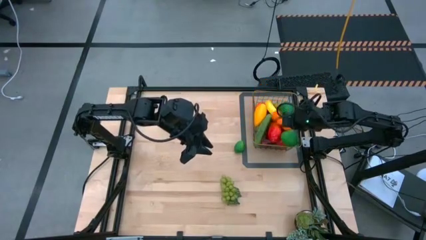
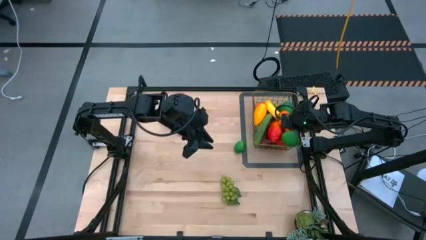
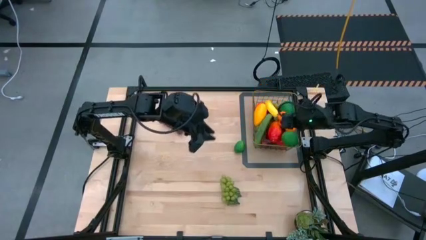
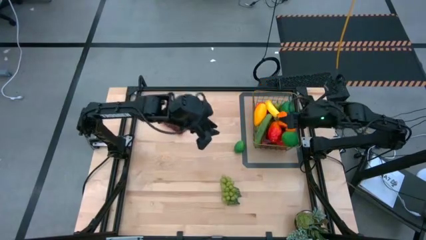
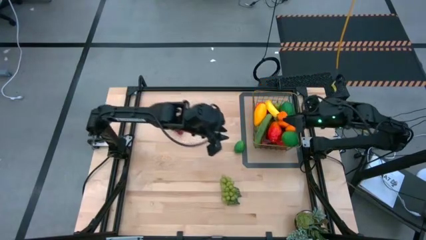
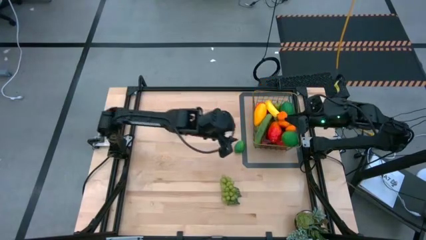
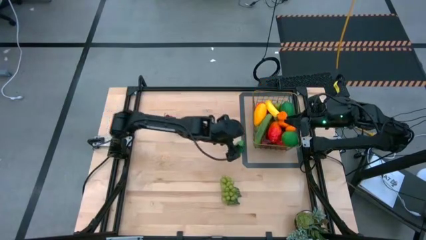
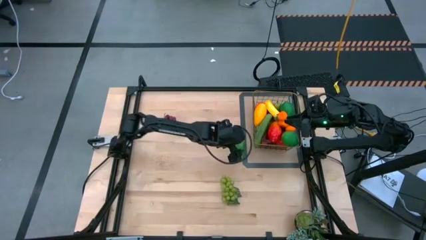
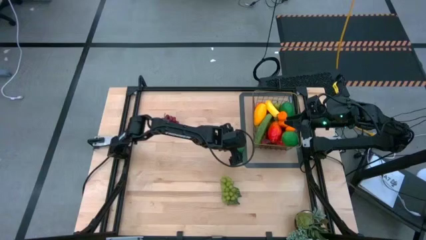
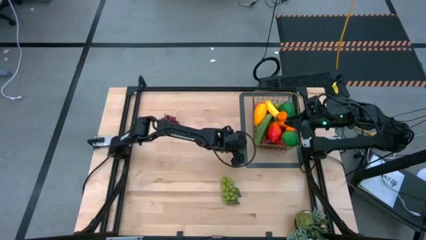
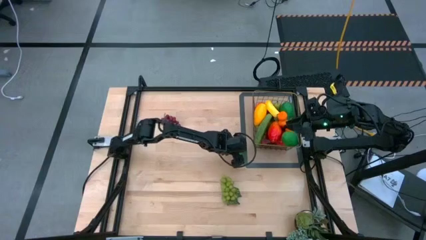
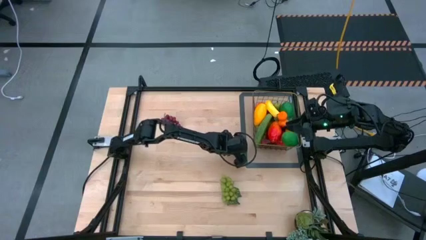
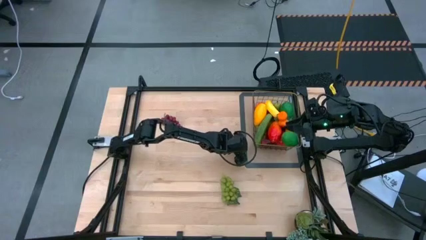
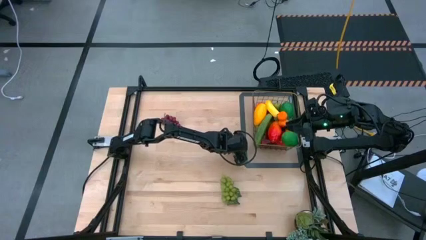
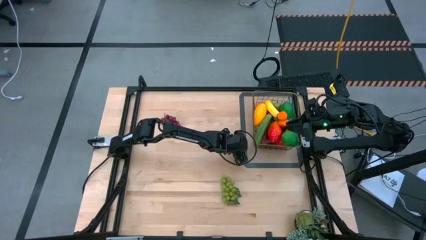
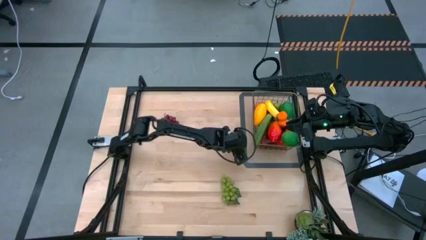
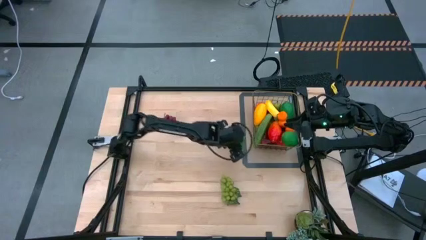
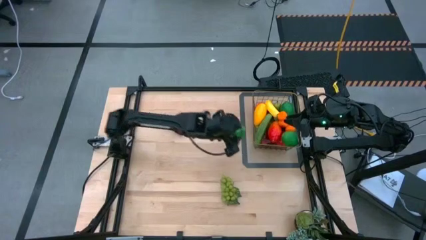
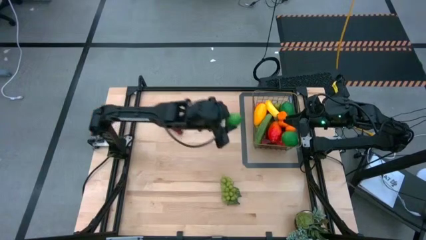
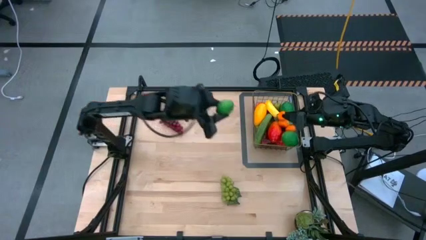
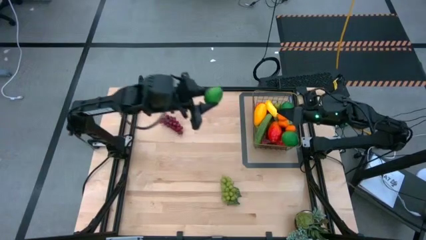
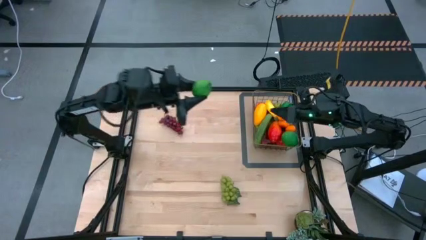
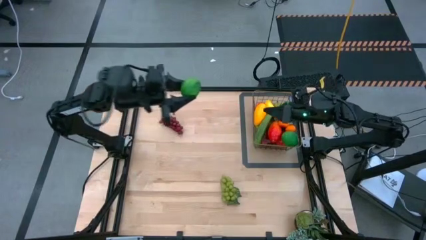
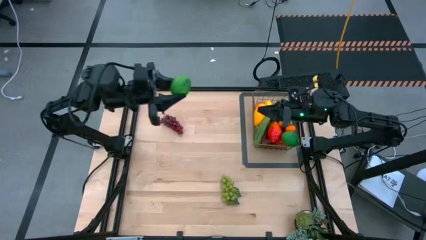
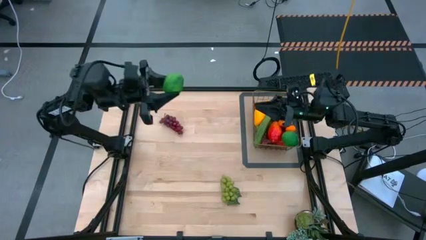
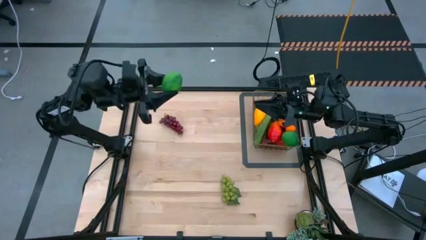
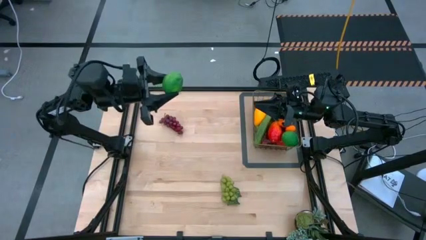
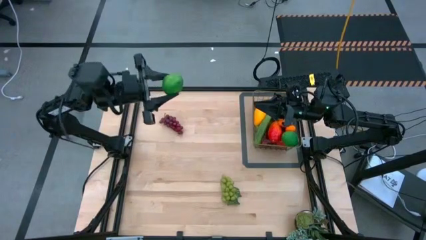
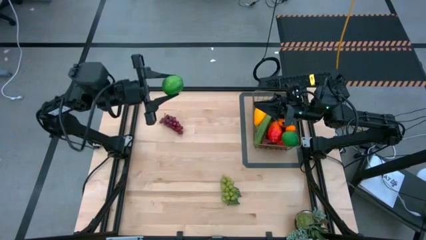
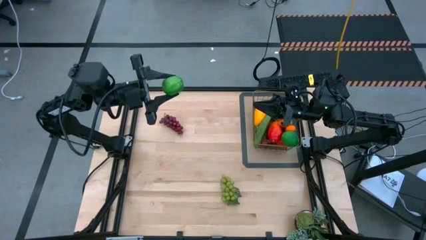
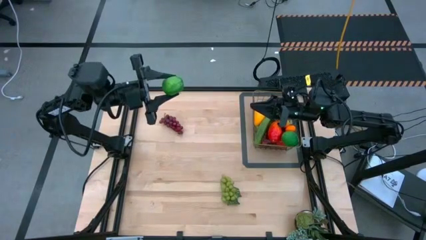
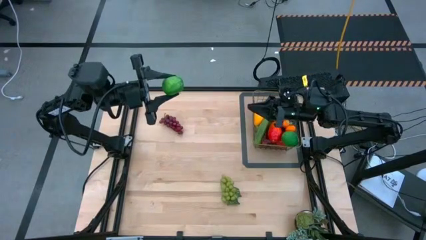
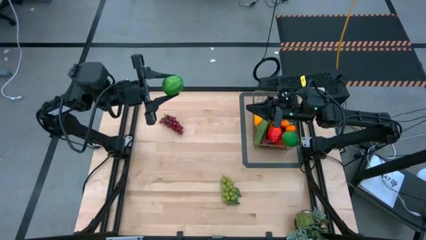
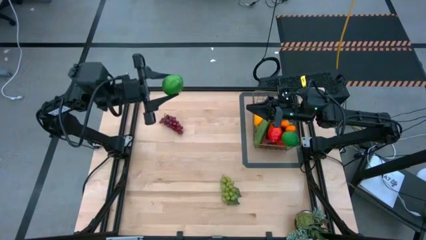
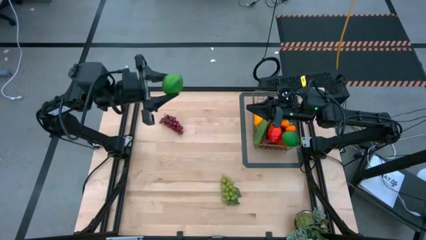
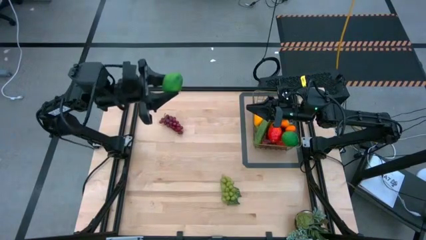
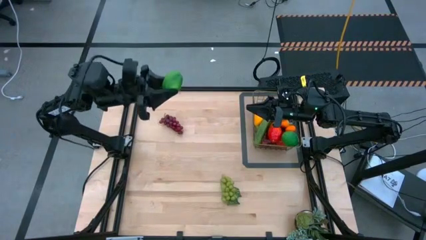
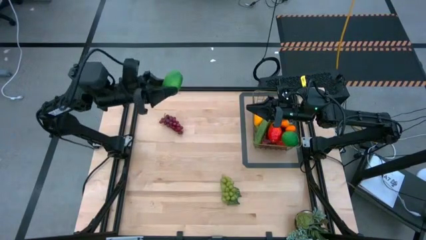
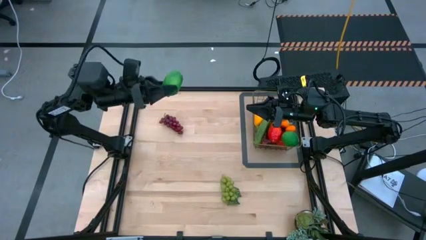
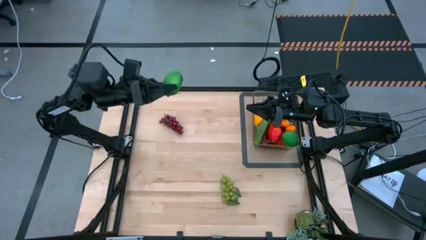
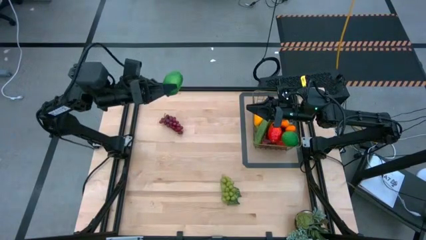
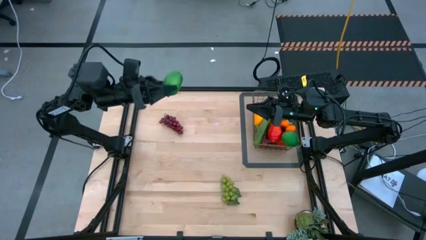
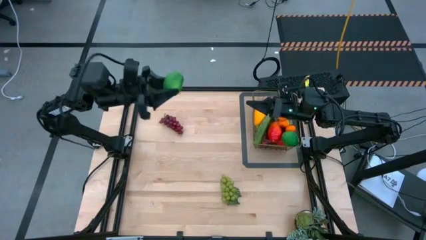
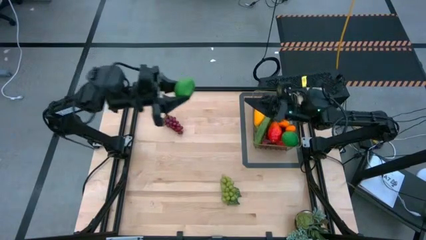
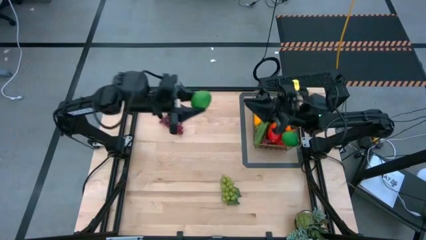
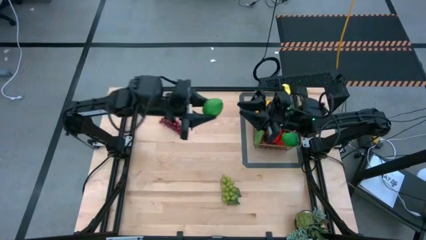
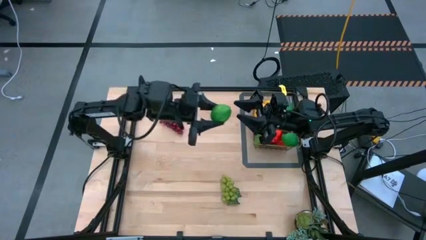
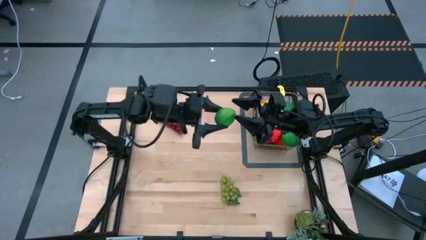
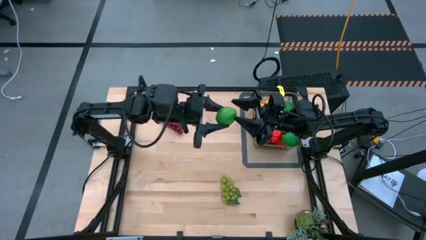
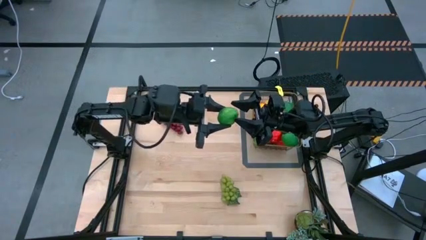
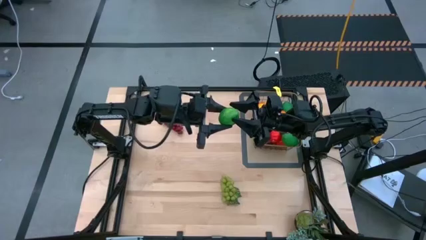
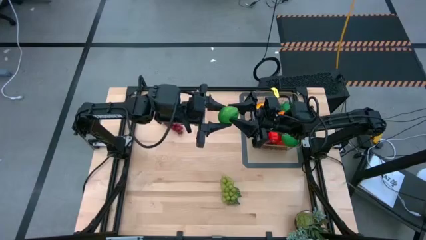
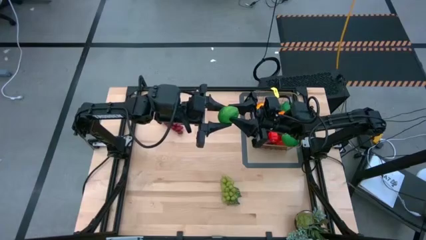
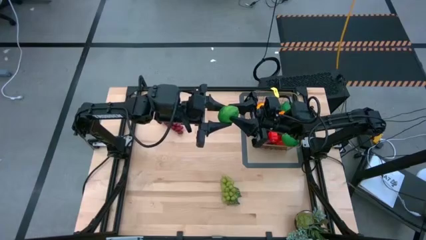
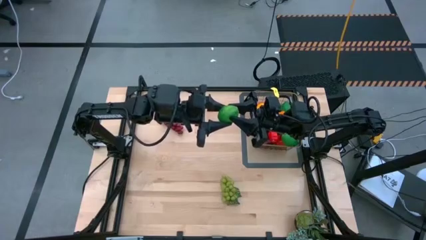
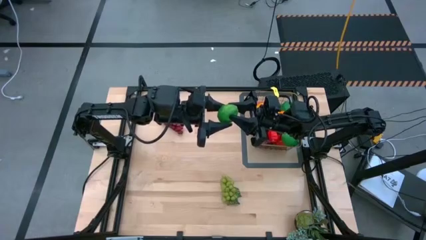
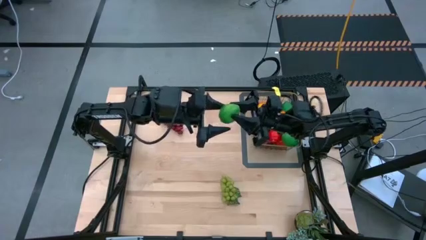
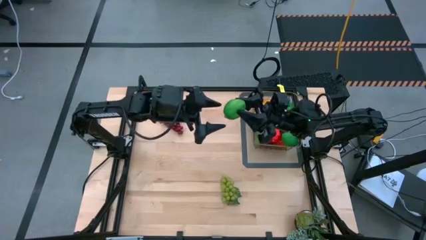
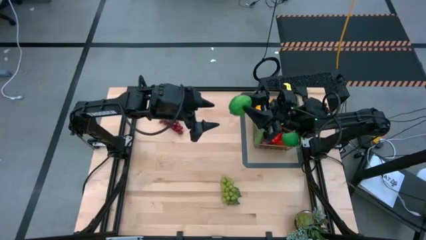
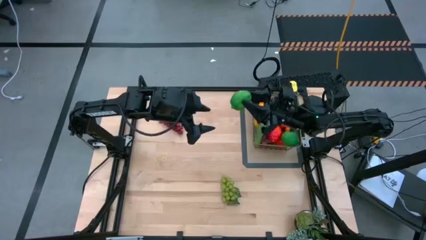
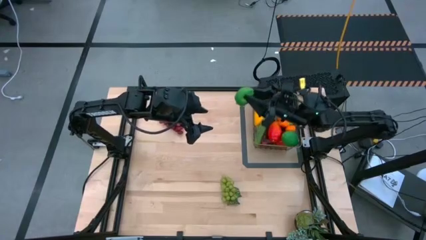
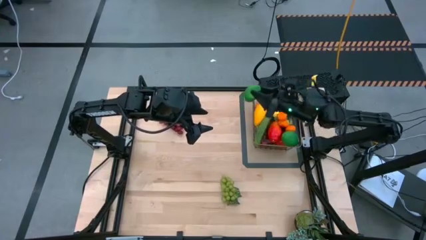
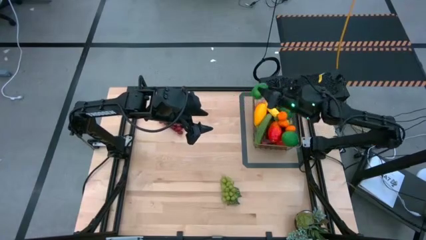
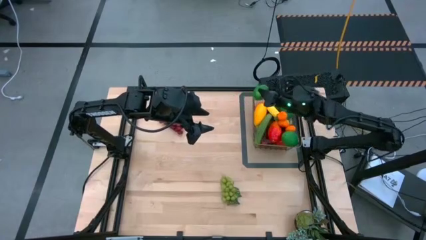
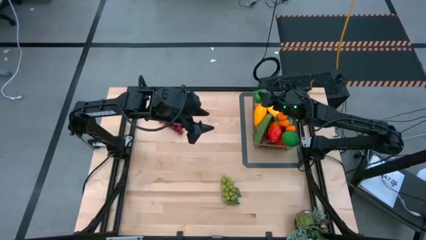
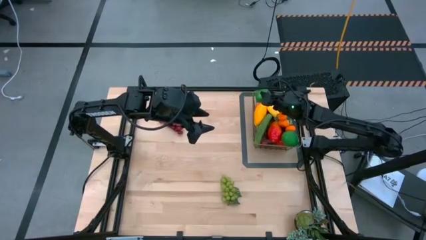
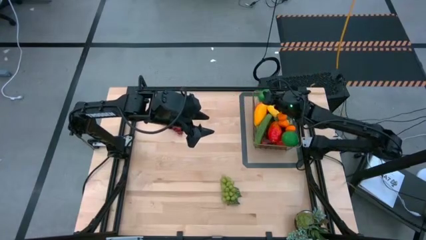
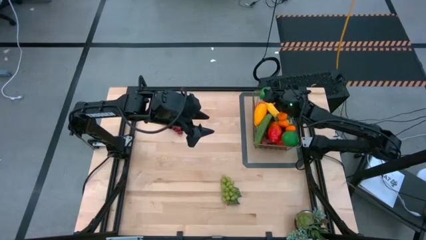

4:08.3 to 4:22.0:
Task: Build produce basket
Put the green lime into the wire basket

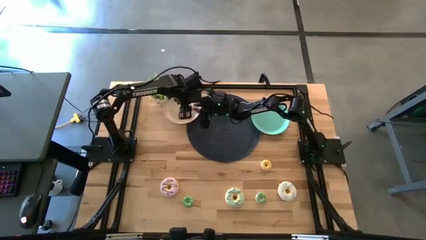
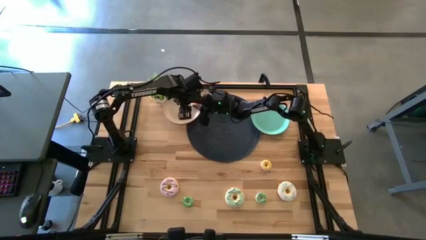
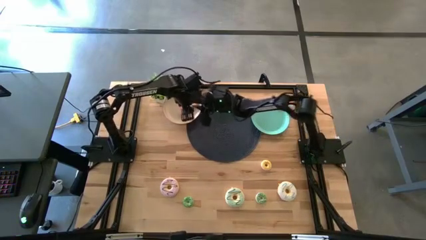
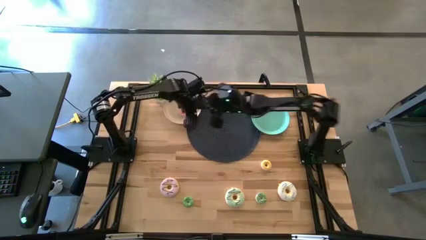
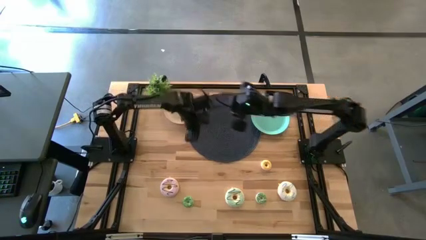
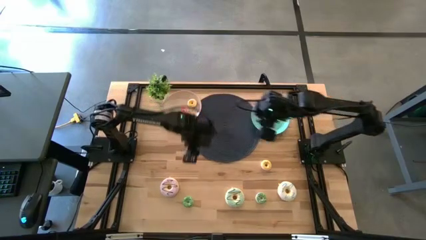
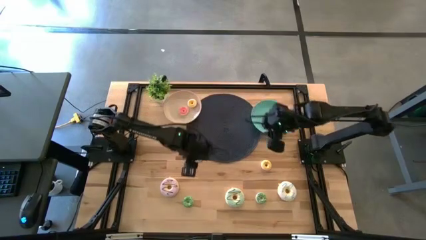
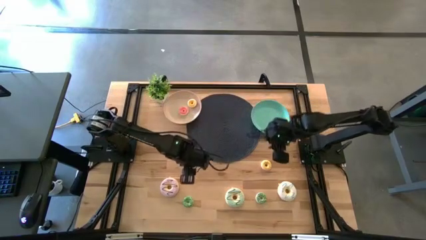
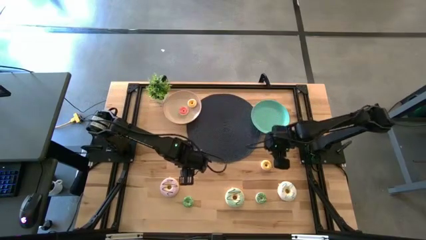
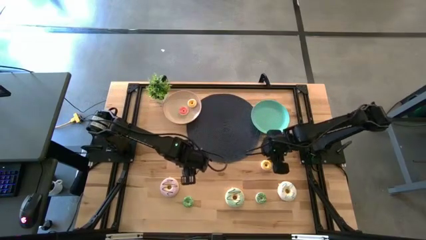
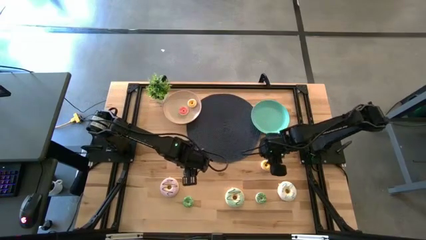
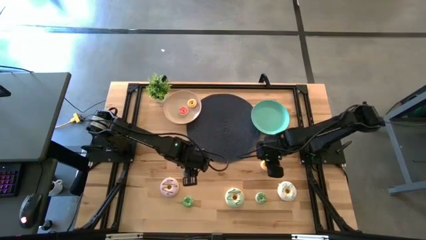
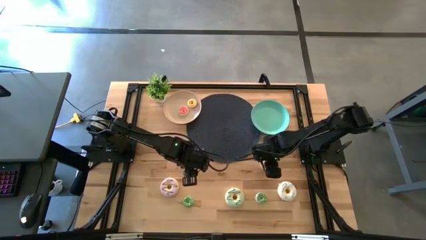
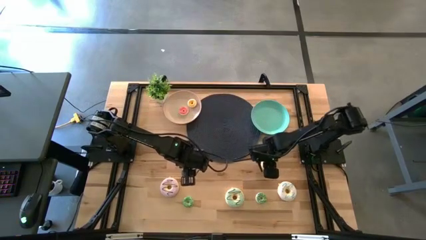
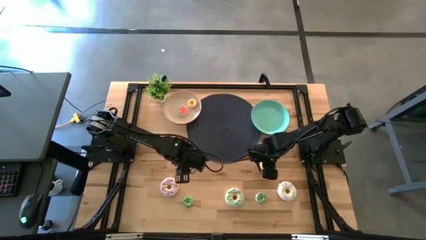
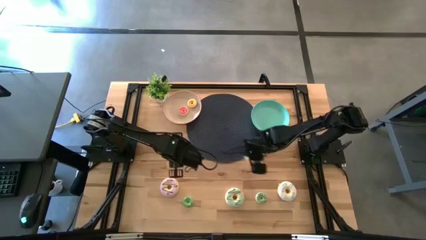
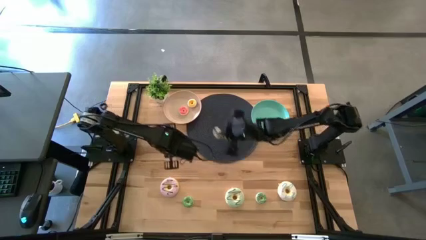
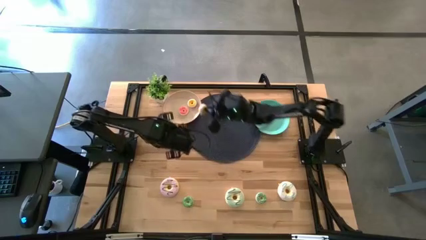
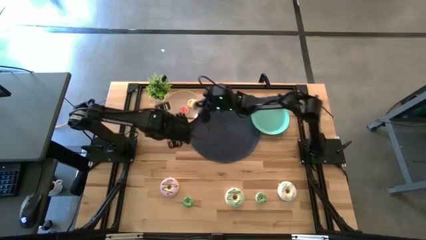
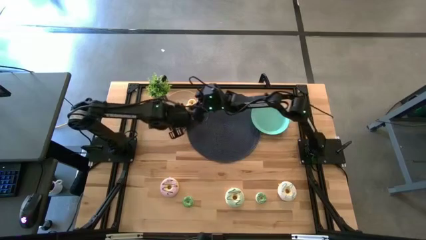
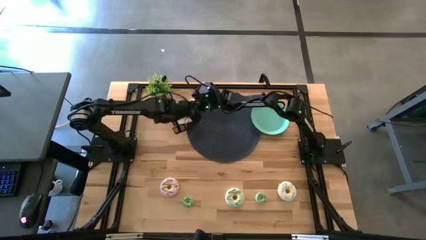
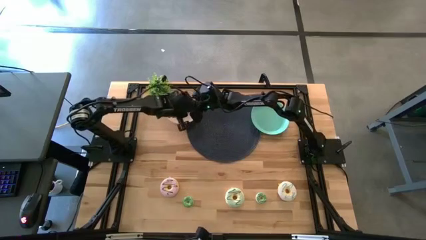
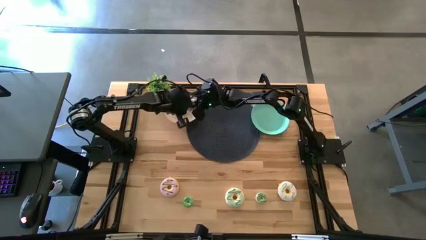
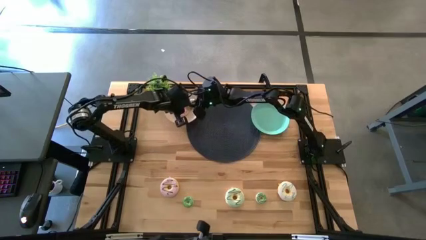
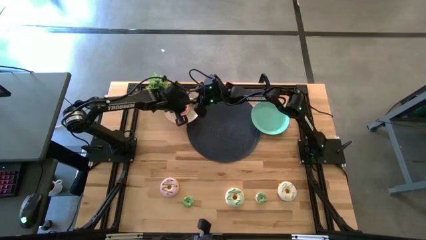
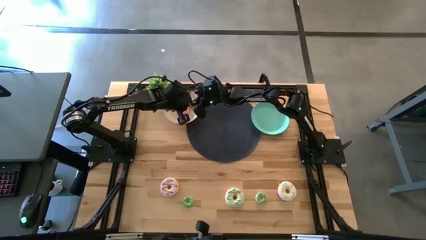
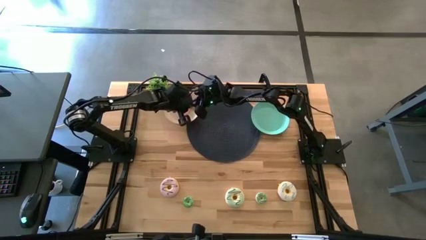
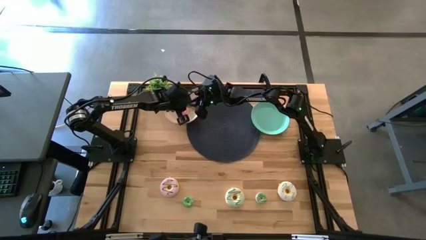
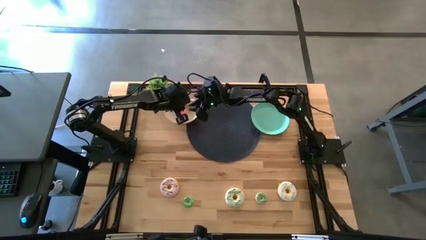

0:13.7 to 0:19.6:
Task: Pick & Place donuts
Put the small yellow donut on the white plate
